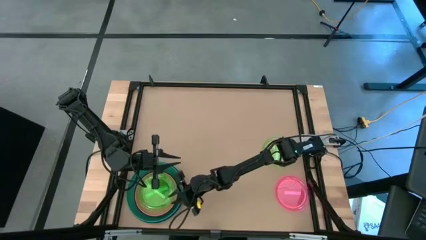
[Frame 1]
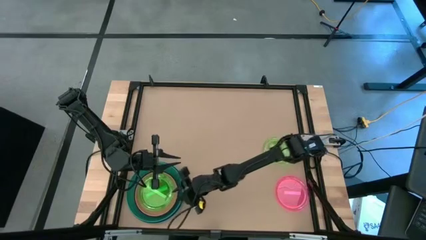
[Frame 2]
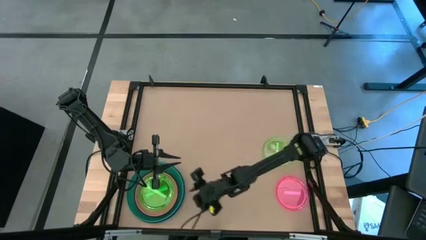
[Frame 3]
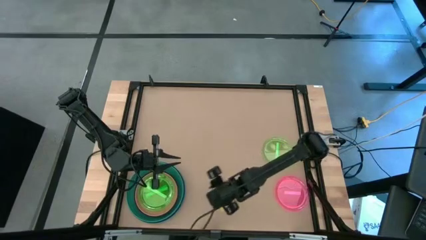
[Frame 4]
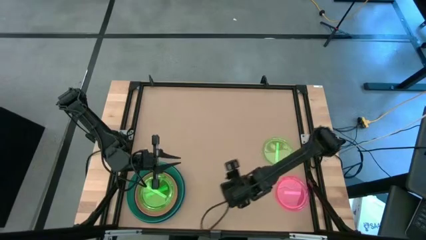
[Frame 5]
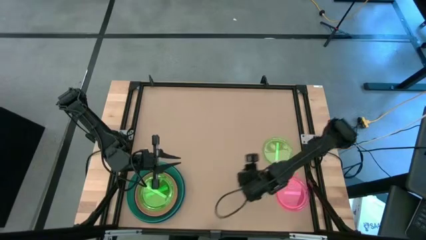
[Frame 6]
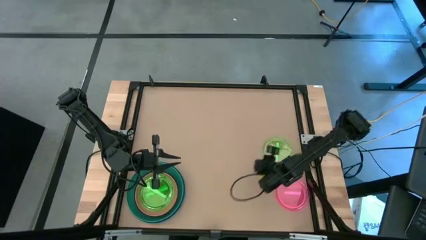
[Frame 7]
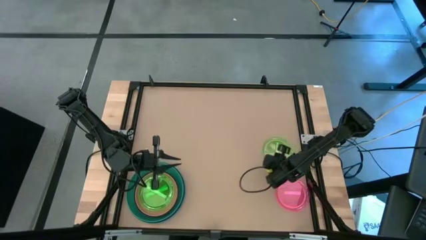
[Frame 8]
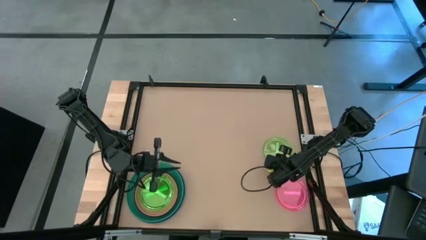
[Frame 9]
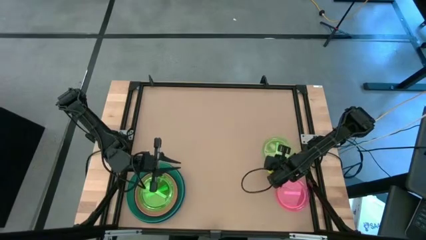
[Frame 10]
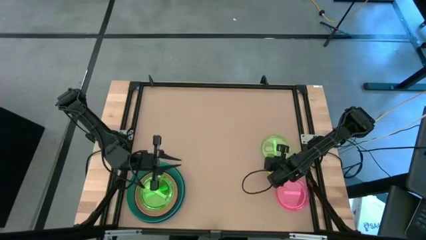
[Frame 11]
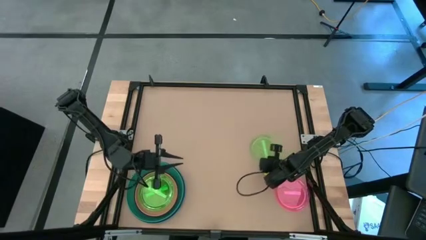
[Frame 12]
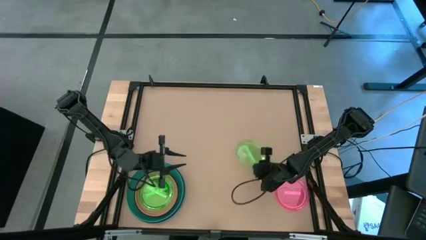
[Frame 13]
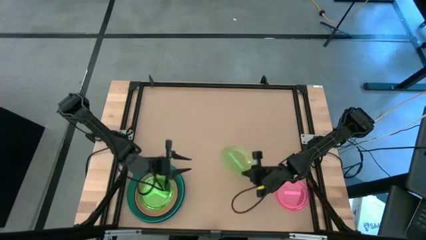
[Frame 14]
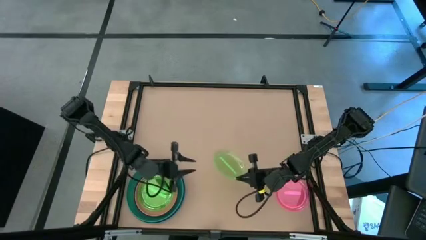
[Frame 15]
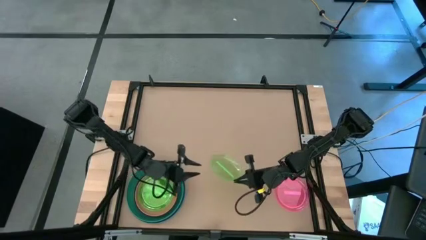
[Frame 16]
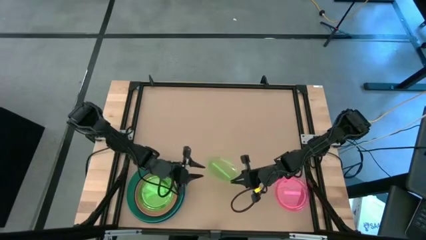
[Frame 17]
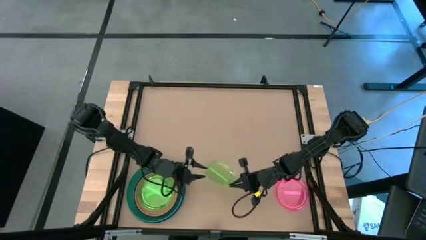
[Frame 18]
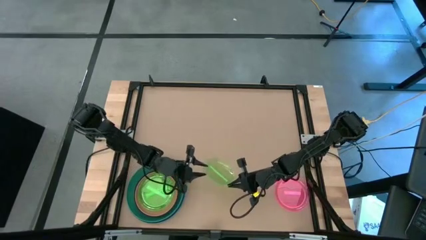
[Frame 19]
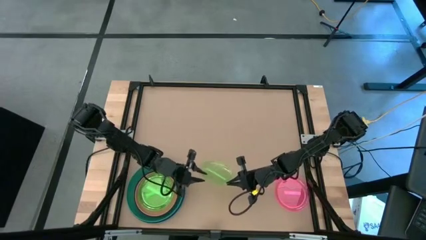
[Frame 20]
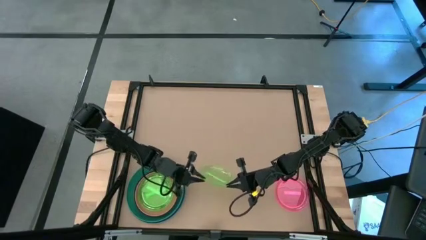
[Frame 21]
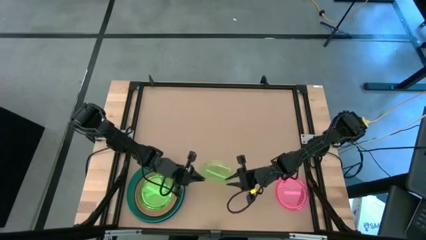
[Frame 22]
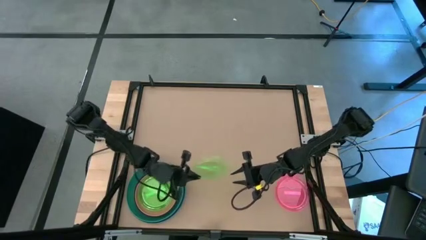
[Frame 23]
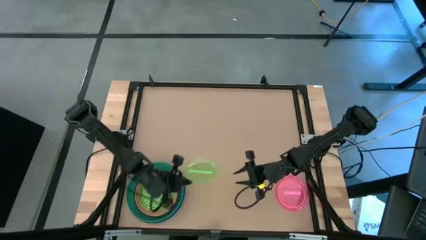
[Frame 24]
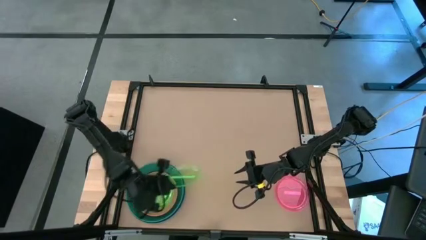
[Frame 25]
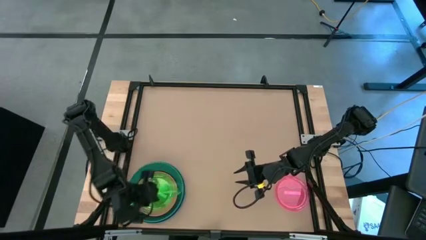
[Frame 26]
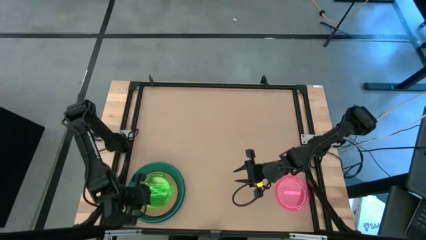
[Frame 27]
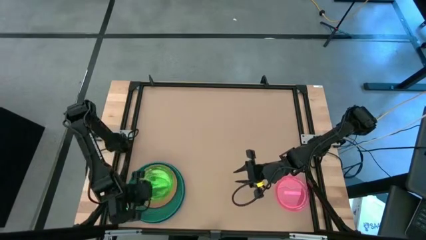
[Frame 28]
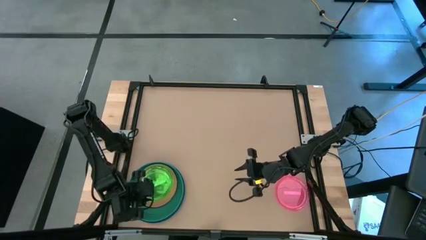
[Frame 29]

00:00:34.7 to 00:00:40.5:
Task: Stack plastic plates
Stack the green plate on top of the green plate

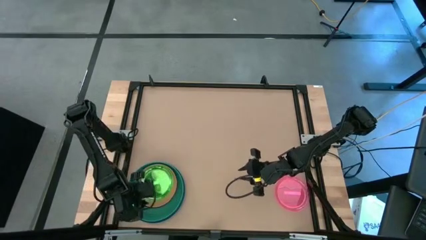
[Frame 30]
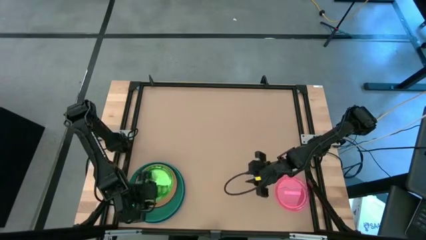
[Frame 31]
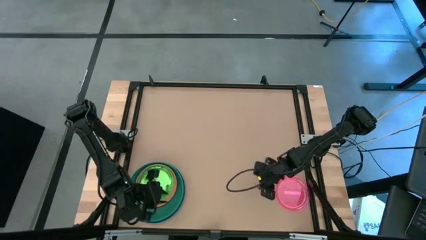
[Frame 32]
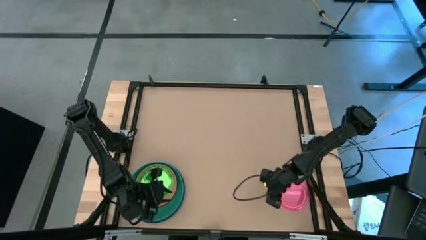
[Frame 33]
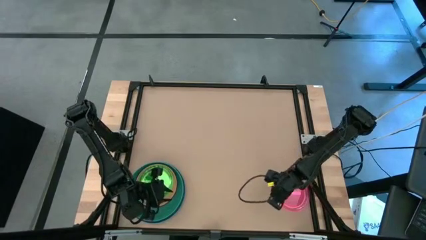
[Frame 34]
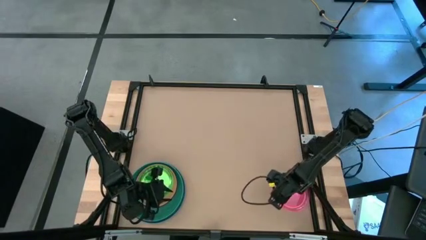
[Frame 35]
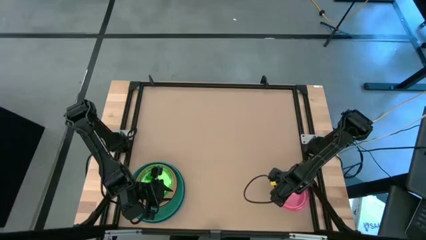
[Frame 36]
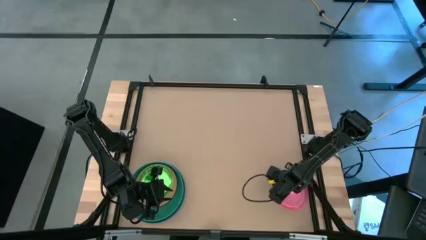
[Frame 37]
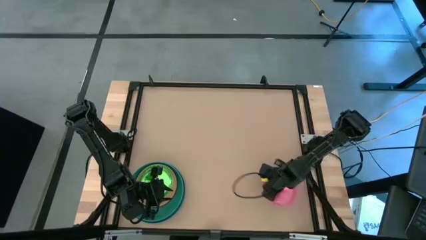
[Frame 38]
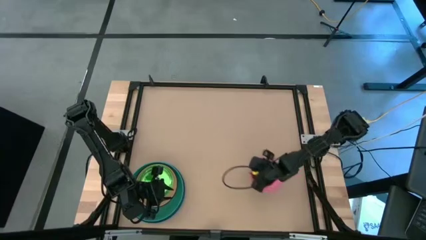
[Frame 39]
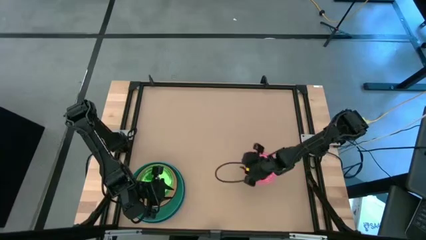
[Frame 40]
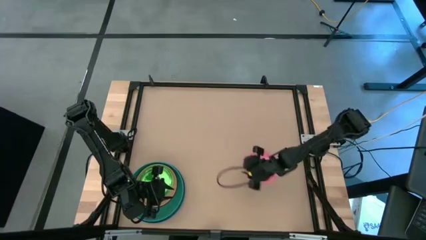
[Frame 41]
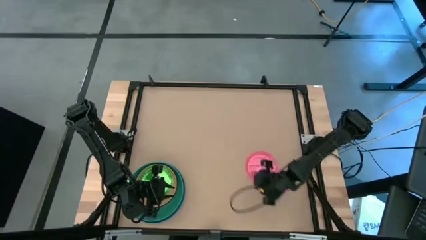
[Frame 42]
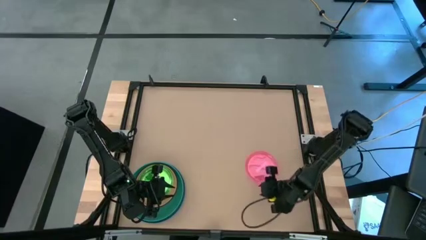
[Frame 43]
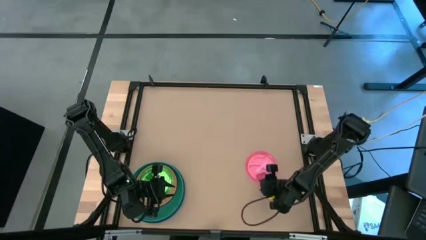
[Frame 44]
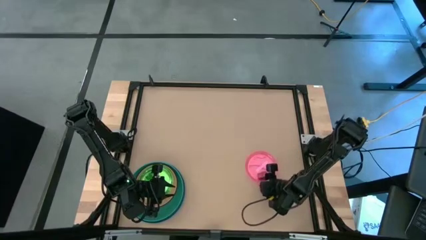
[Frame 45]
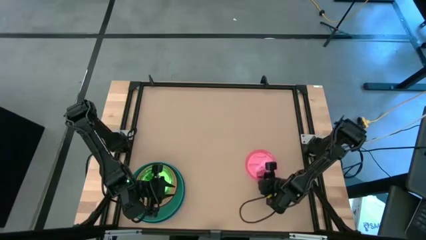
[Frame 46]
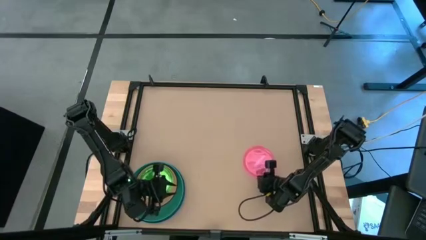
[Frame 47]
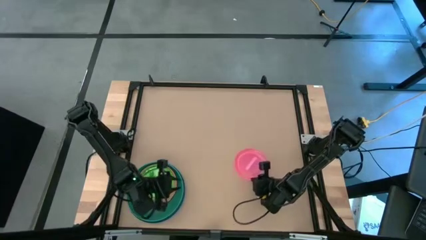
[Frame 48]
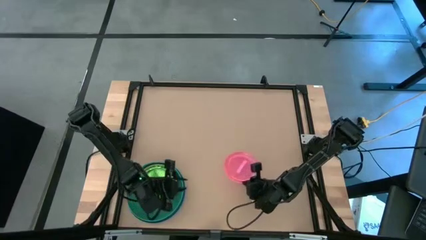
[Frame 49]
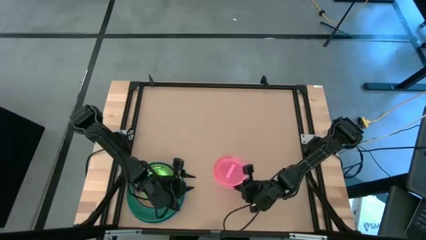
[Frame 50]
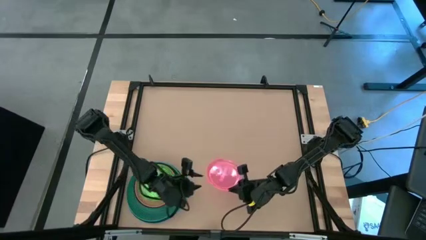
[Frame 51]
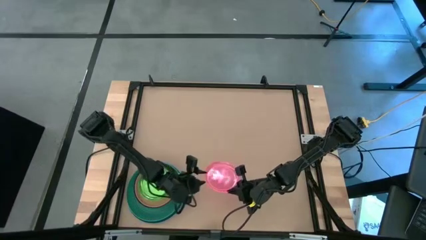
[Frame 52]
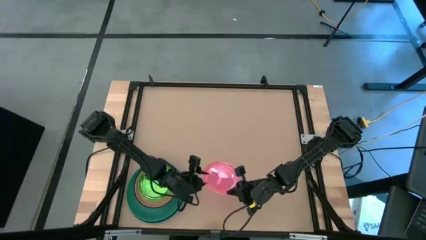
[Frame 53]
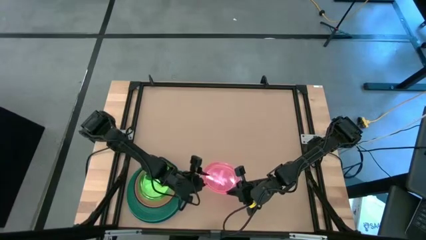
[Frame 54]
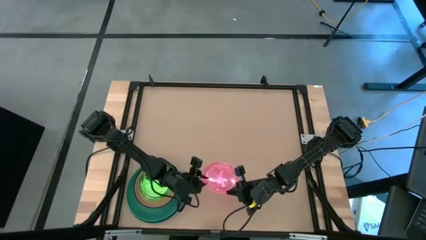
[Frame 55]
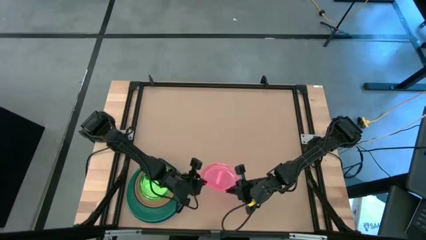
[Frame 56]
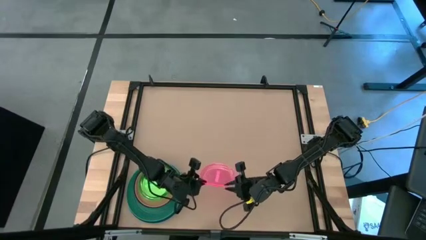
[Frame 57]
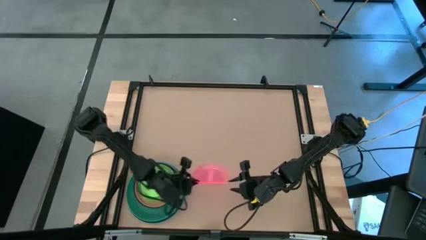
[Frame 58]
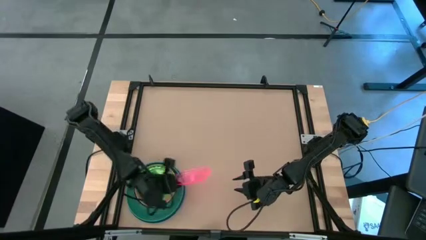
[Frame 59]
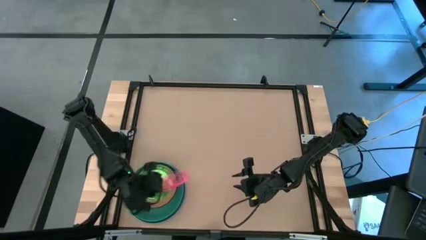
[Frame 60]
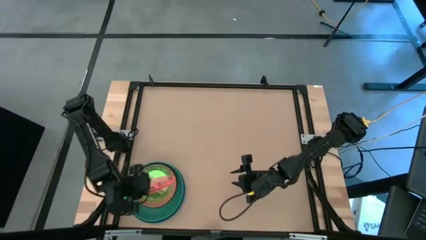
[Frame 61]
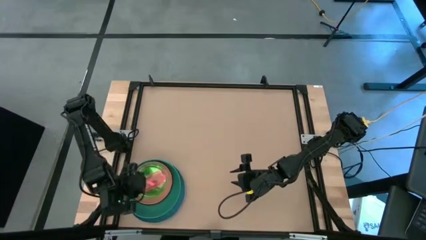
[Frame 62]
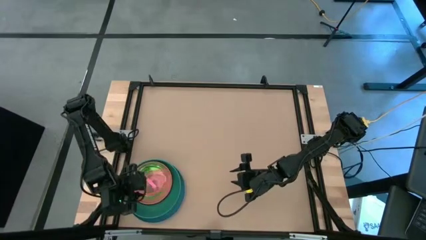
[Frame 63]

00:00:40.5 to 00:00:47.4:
Stack the pink plate on top of the green plate

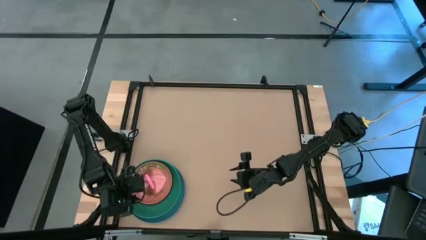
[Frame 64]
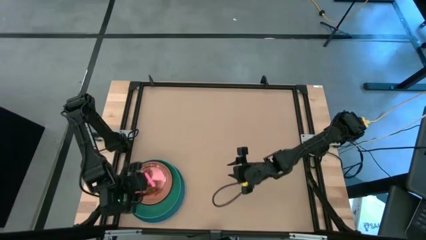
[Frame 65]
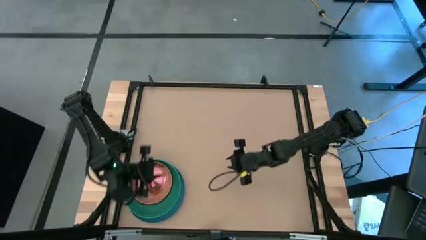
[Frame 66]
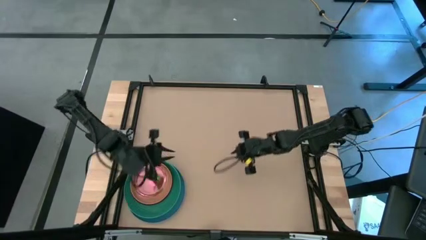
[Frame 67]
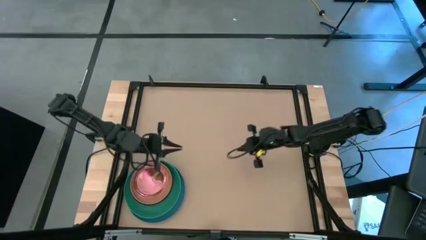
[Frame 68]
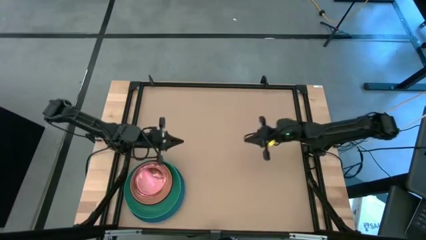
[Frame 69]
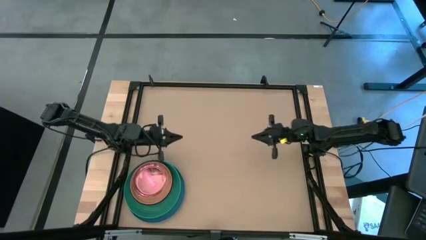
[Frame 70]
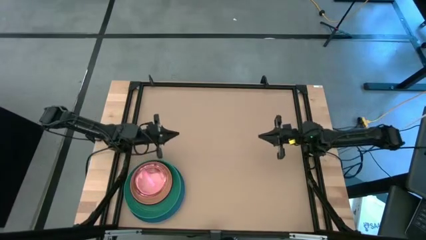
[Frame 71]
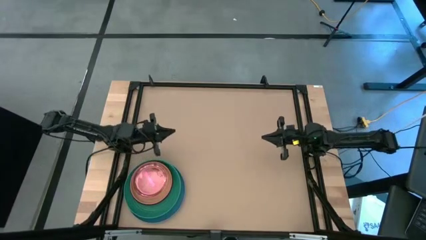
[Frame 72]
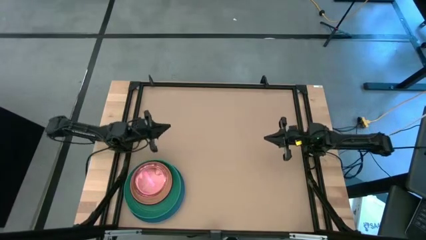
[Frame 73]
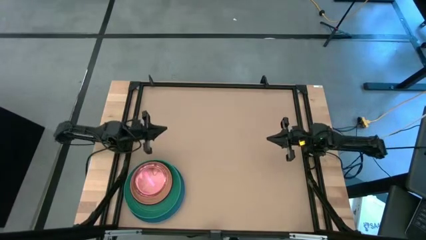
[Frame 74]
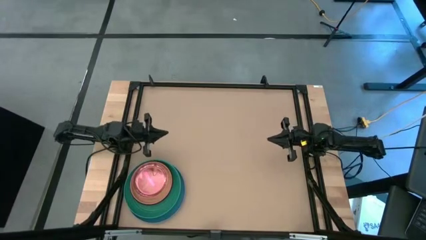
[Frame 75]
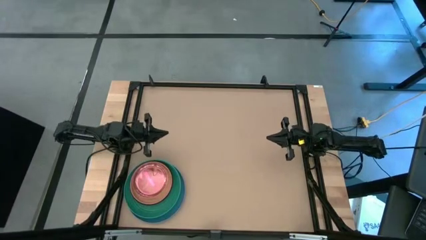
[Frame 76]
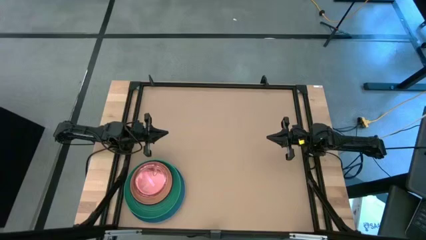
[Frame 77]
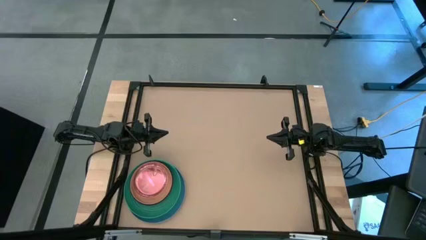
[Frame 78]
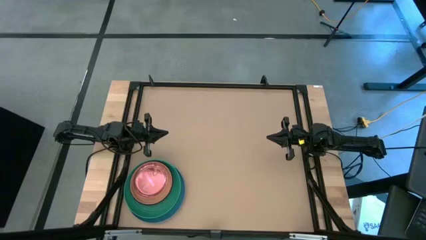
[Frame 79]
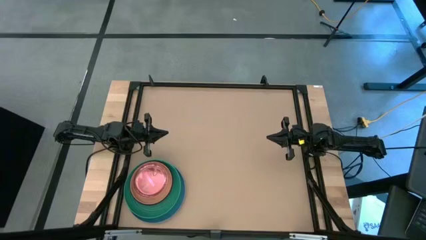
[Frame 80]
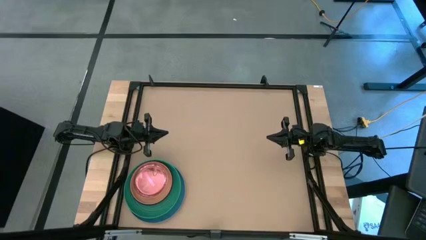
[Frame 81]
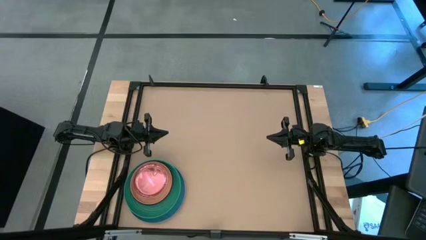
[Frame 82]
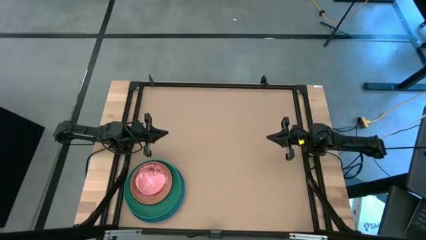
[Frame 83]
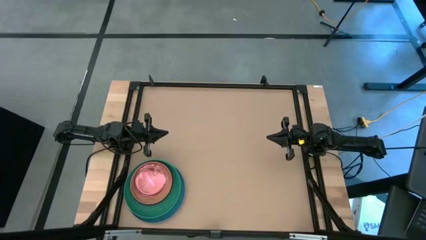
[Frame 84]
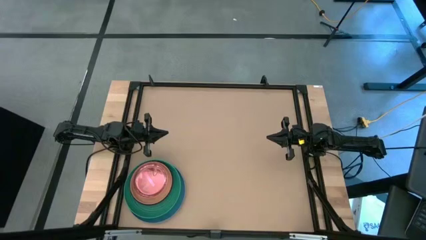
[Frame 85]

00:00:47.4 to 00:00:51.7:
Return to Home Position

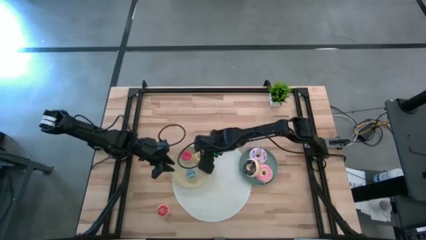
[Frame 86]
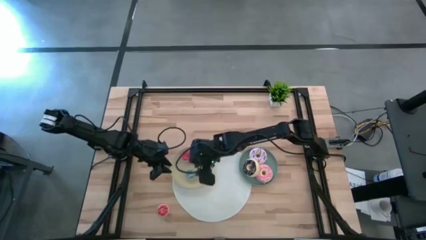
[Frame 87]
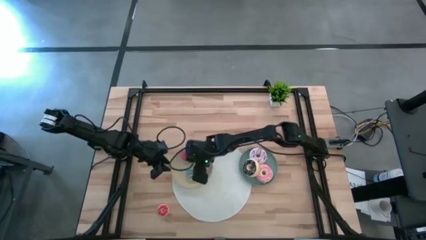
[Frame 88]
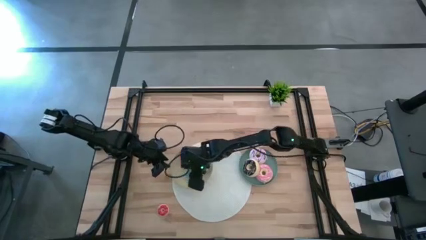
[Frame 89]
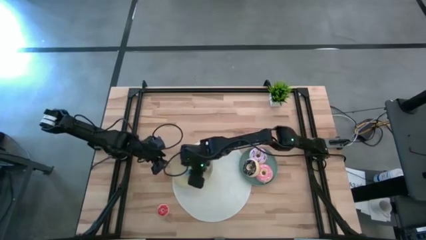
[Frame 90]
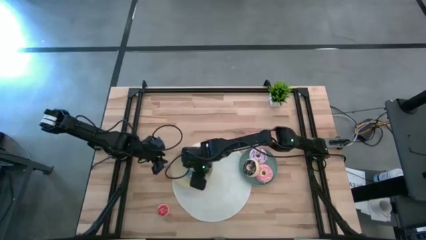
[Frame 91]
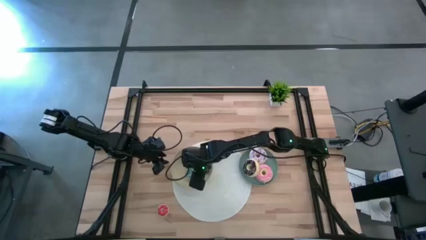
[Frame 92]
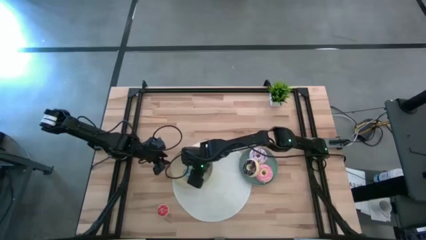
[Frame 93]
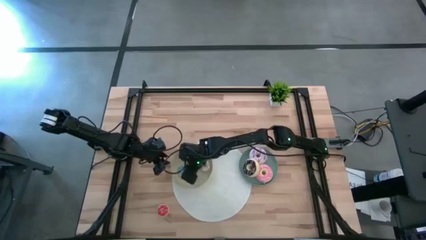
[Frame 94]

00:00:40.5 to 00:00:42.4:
Task: Pick & Place donuts
Adjust the small blue donut on the brown plate
